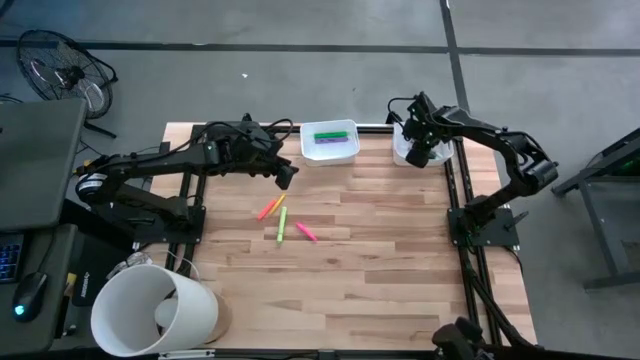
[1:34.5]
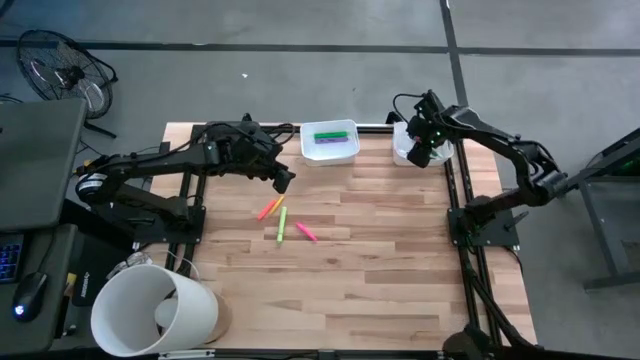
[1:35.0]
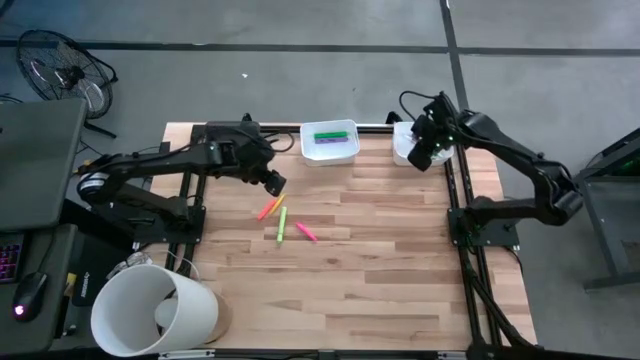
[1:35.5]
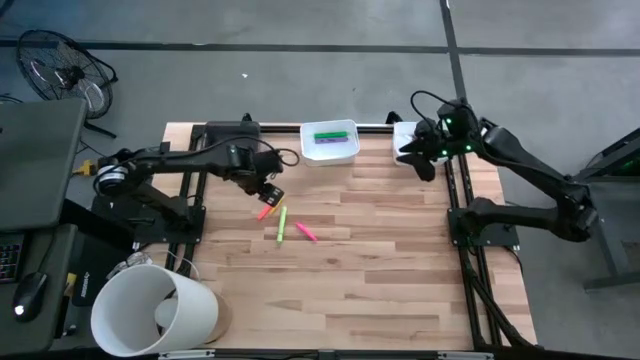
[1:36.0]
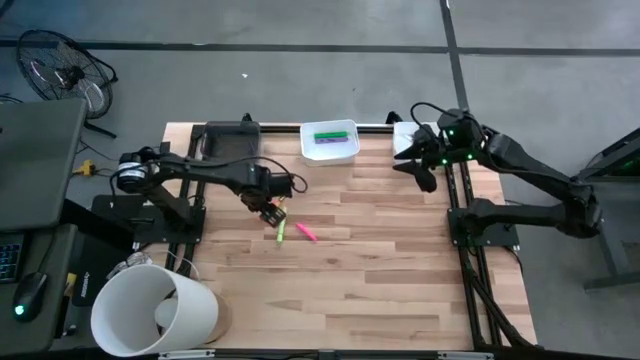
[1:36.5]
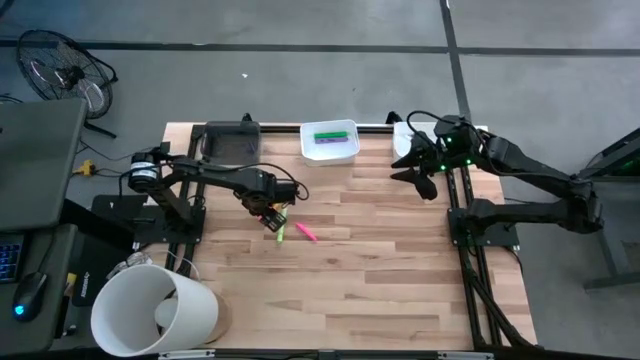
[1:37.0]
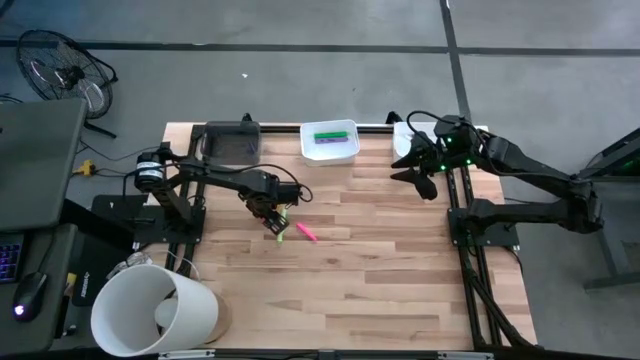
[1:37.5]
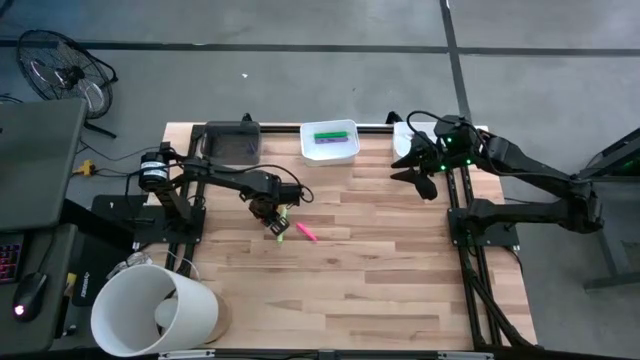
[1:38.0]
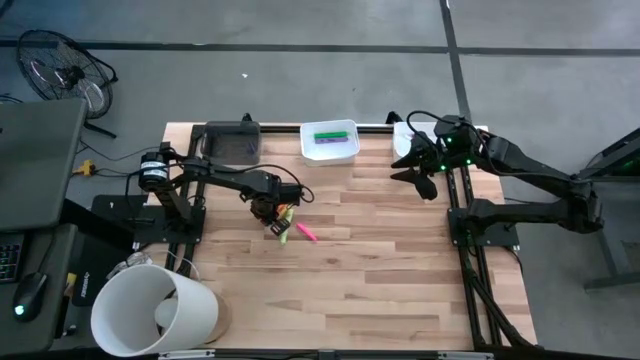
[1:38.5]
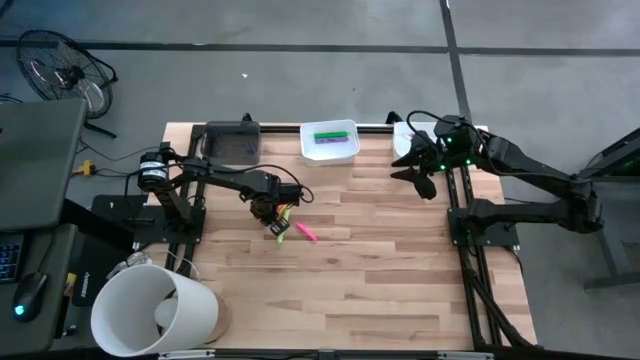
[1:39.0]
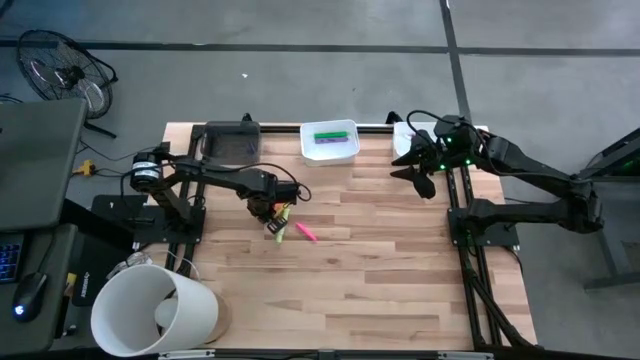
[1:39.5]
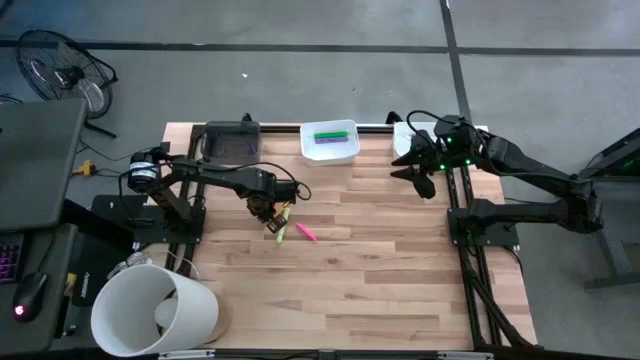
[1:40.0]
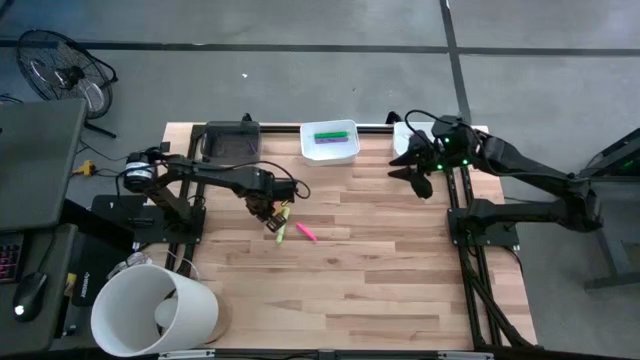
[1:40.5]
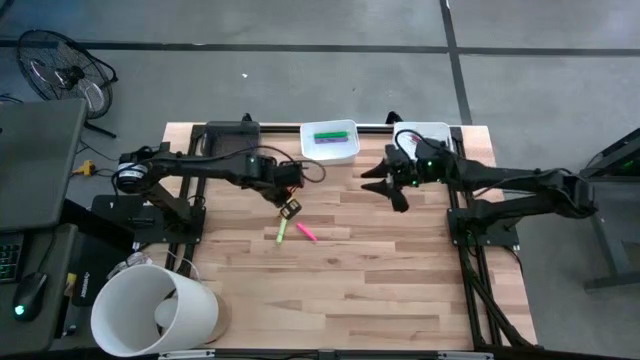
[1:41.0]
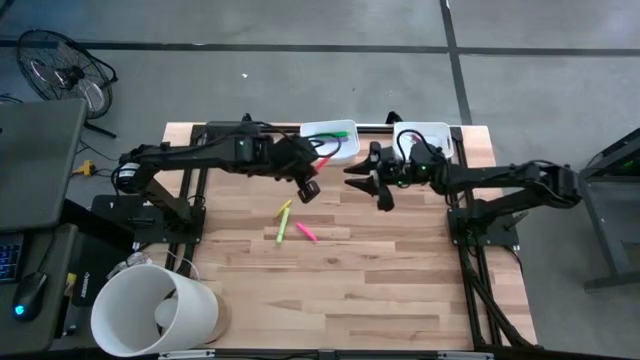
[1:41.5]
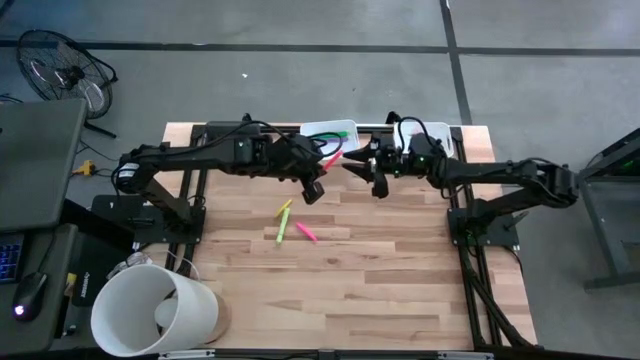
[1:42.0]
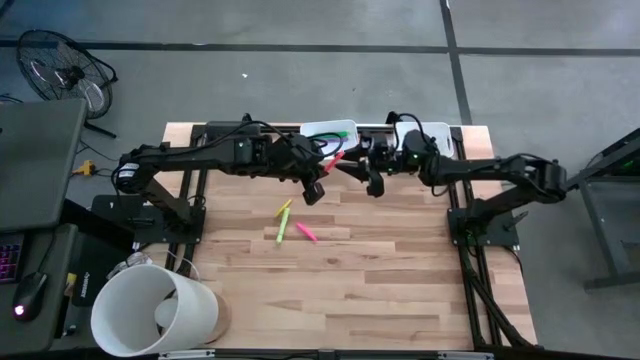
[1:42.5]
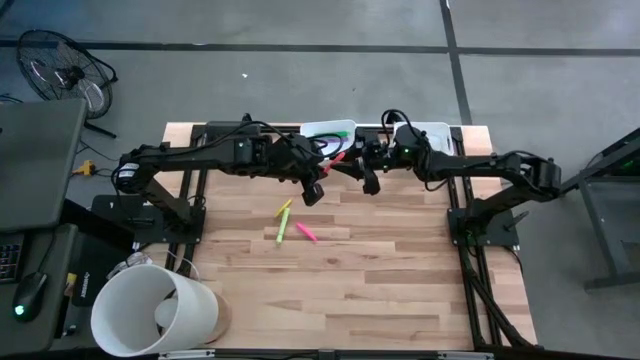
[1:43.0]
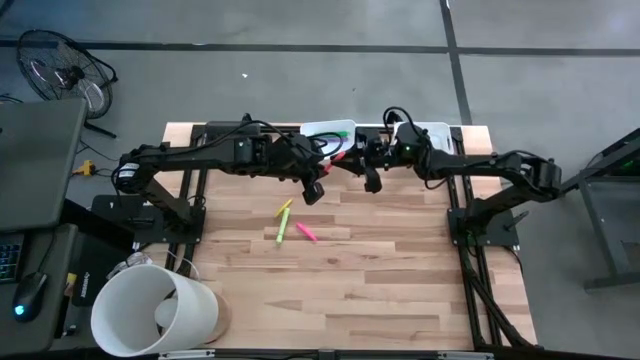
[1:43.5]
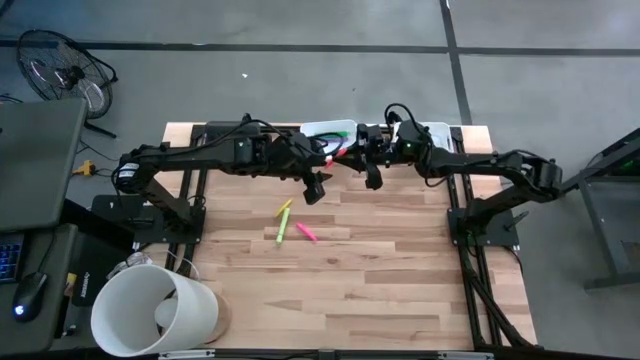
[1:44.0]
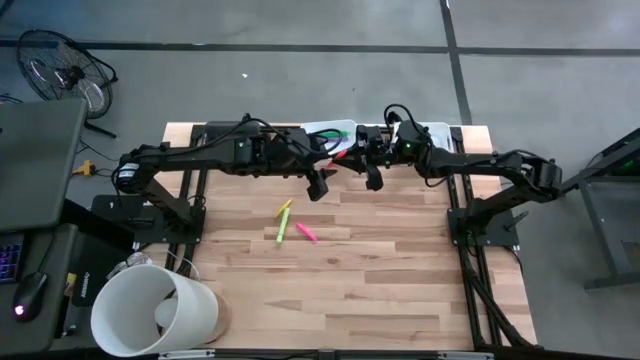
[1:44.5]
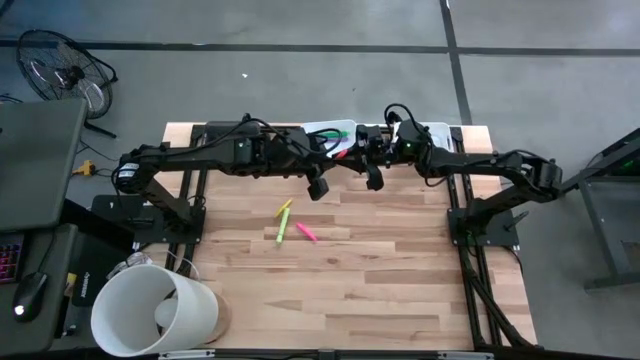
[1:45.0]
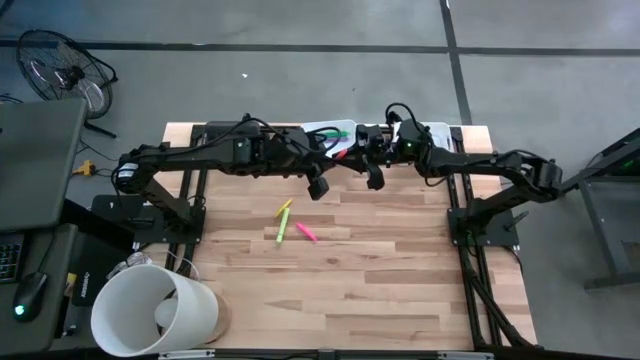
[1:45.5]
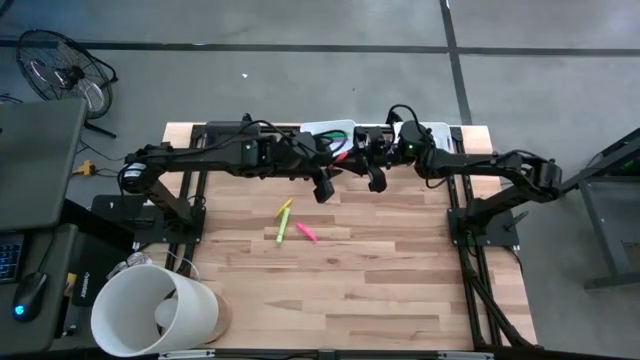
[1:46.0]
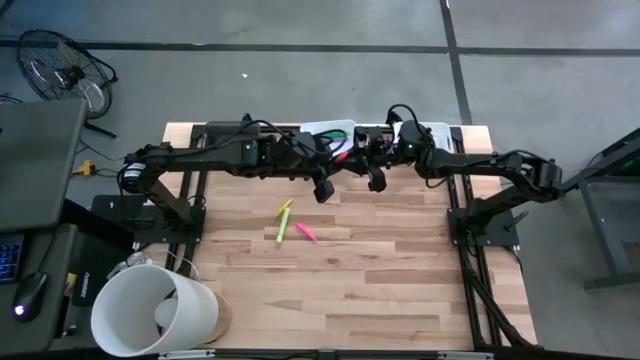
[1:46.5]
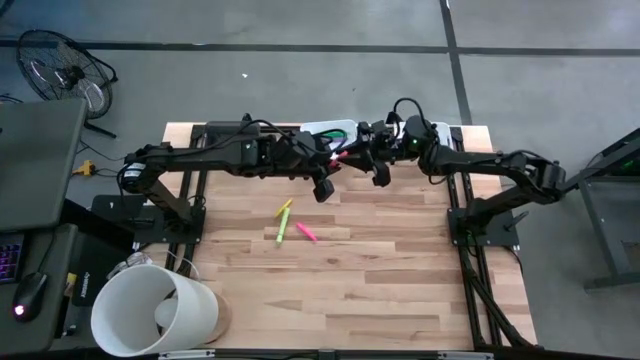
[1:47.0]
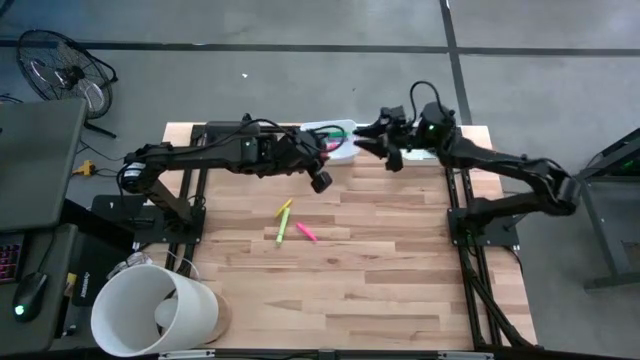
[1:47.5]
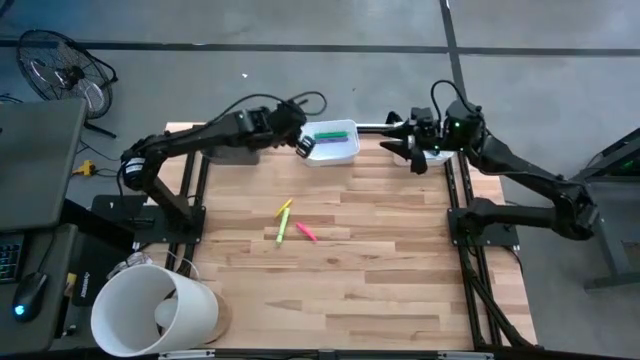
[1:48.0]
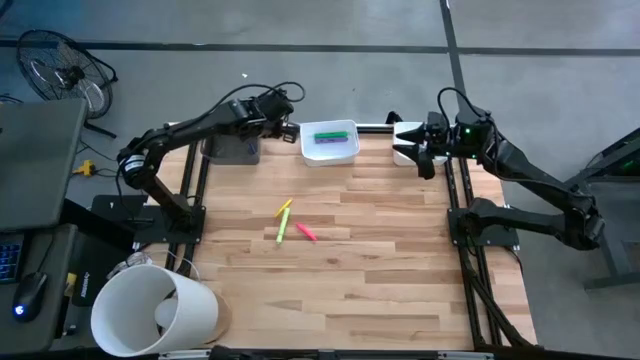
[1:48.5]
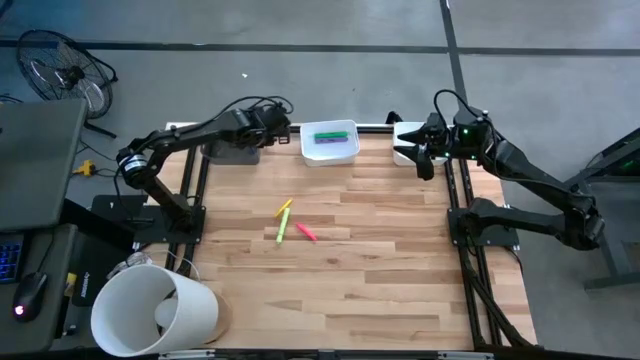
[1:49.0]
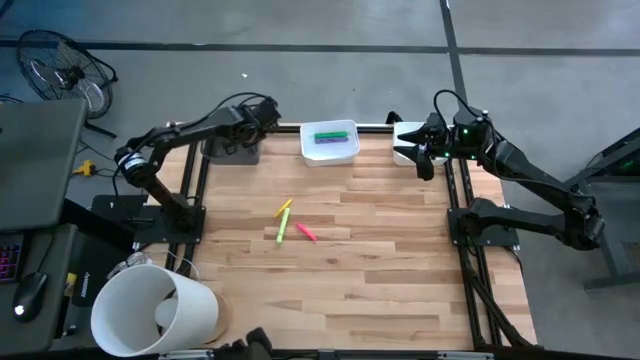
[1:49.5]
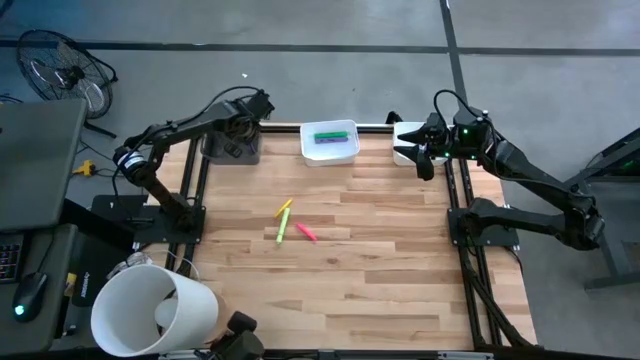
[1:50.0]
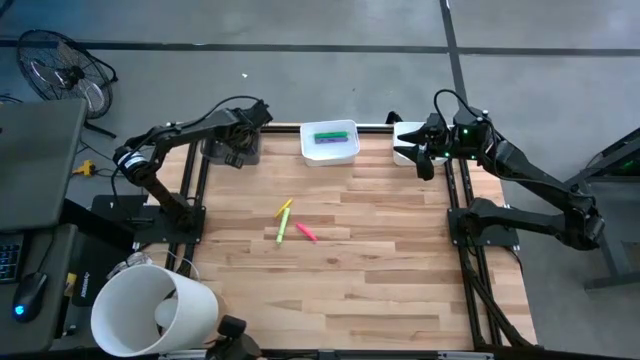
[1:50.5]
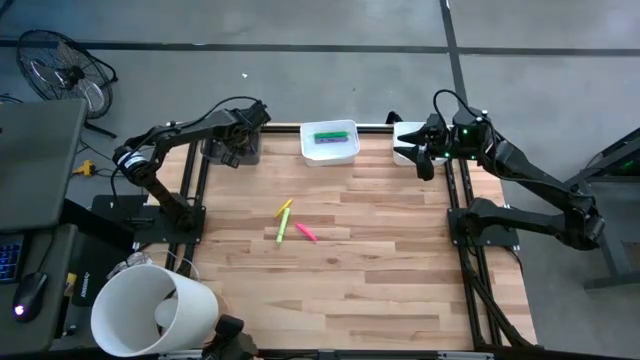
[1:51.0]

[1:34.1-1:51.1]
Task: Pick & Place Markers
Put the orange pen into the black bin
